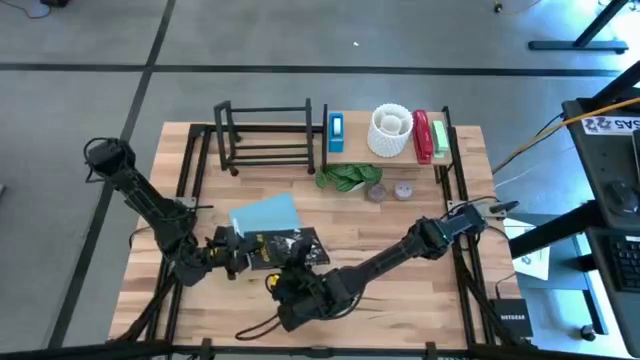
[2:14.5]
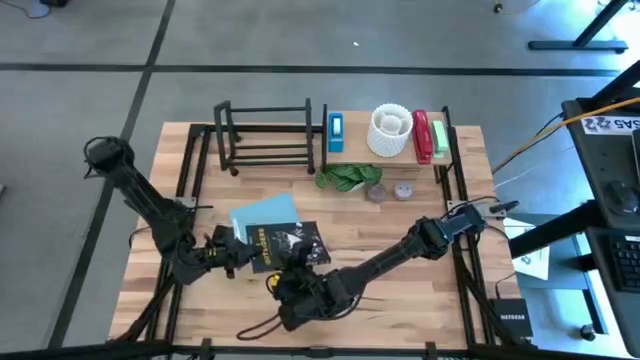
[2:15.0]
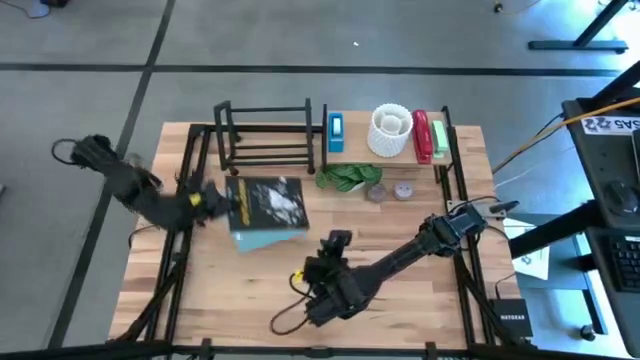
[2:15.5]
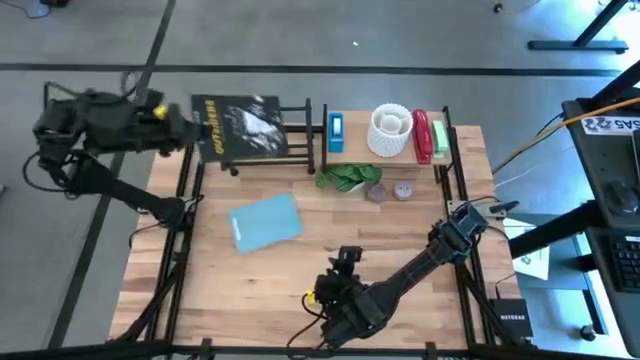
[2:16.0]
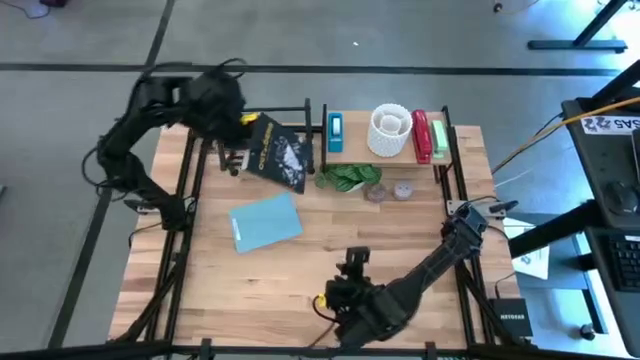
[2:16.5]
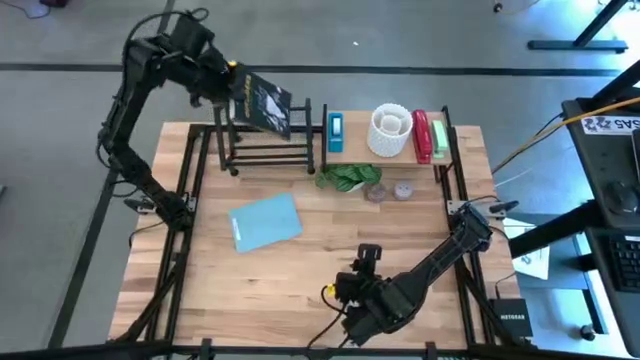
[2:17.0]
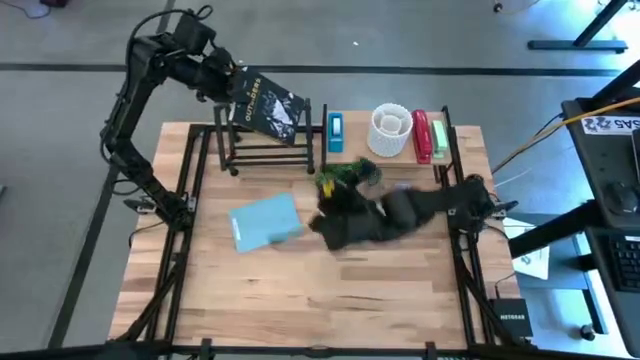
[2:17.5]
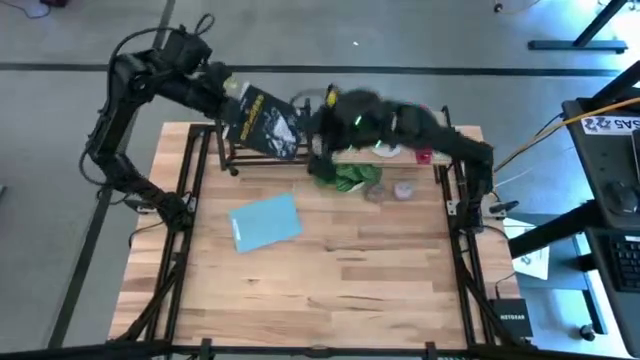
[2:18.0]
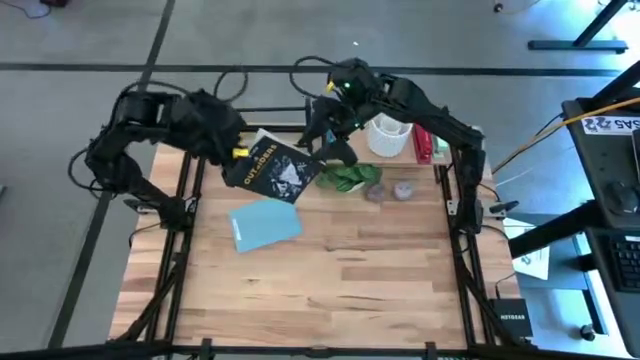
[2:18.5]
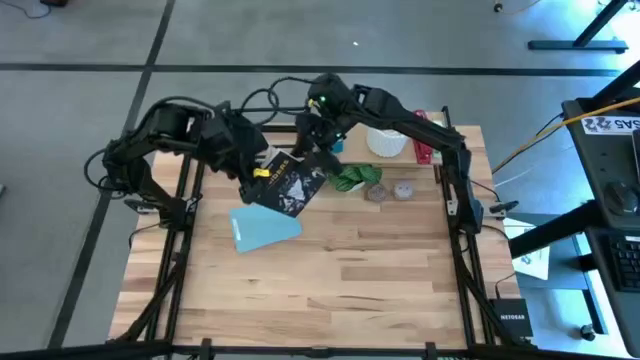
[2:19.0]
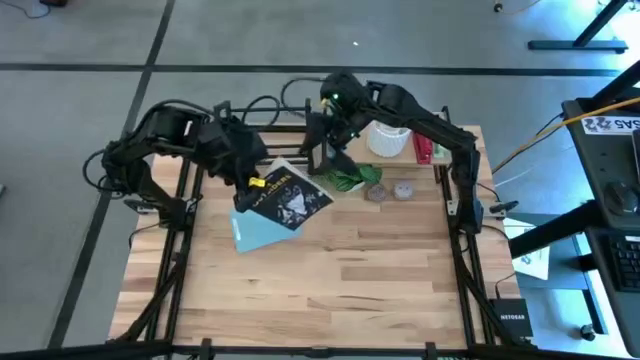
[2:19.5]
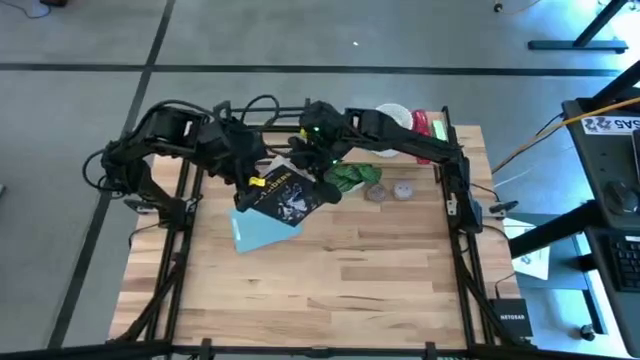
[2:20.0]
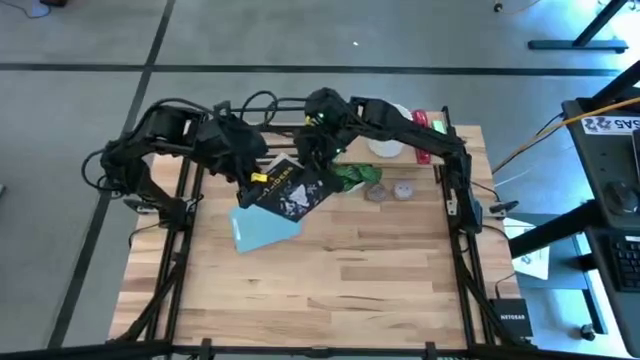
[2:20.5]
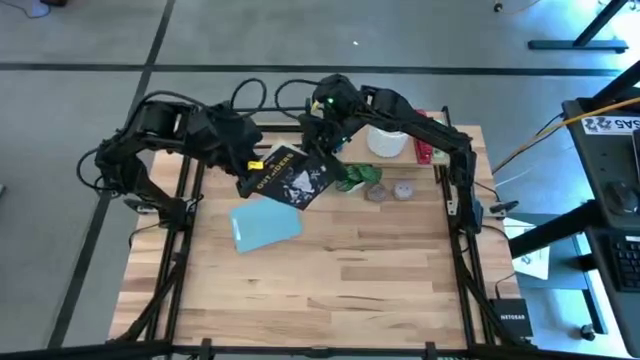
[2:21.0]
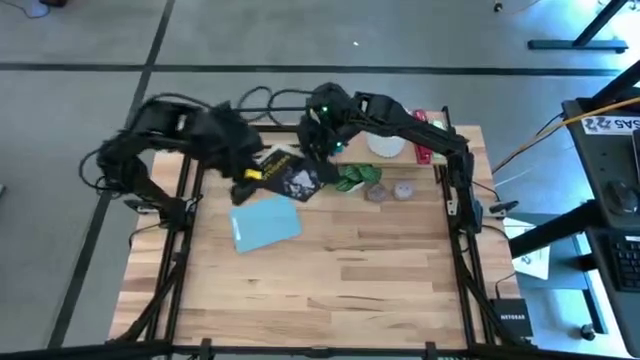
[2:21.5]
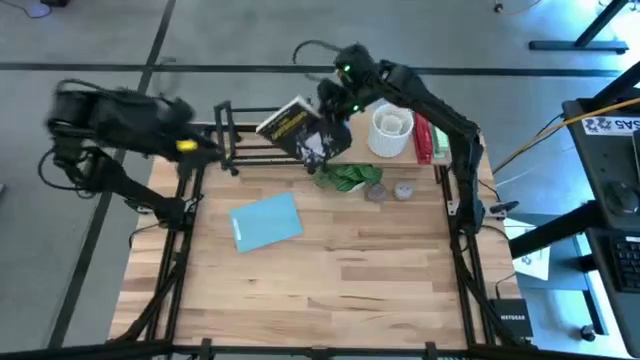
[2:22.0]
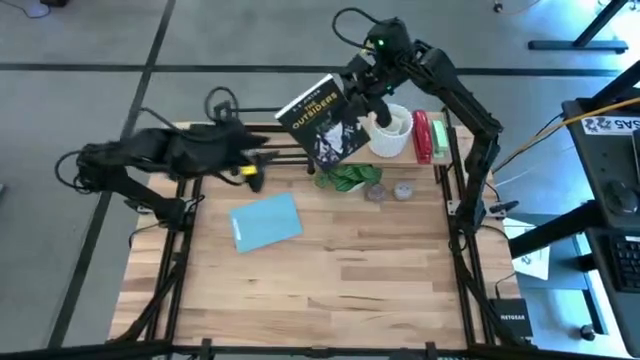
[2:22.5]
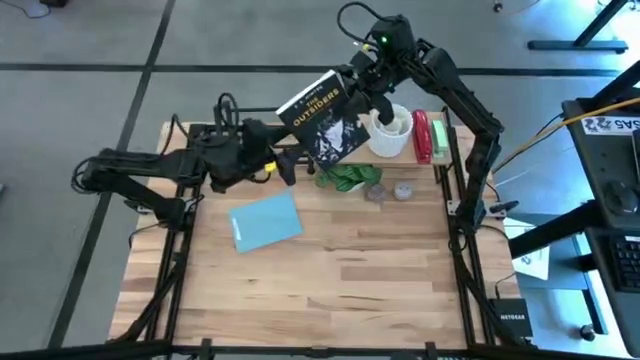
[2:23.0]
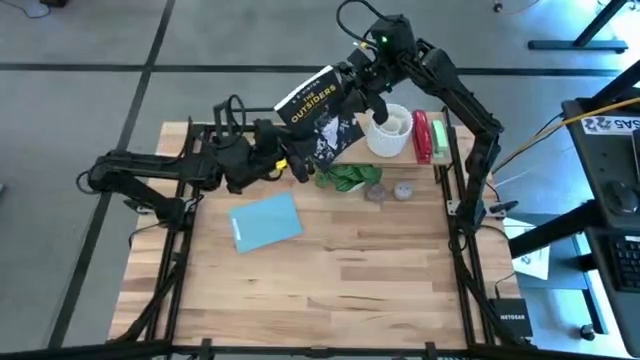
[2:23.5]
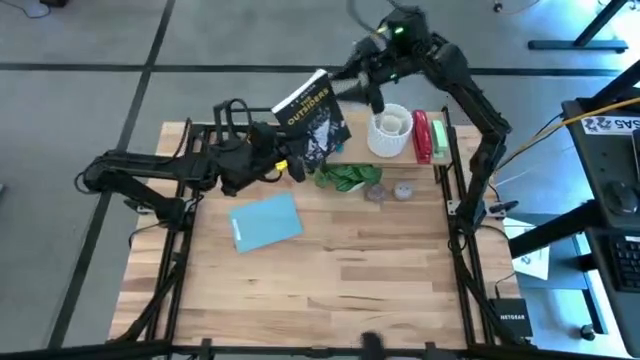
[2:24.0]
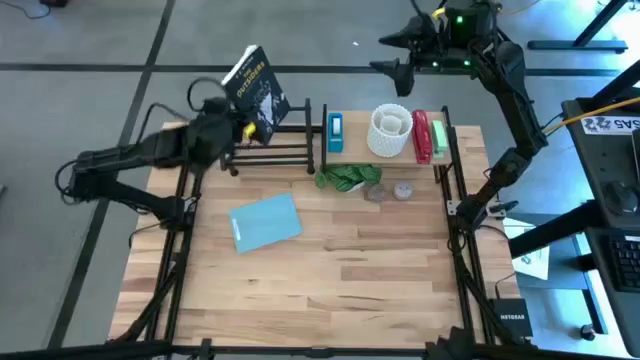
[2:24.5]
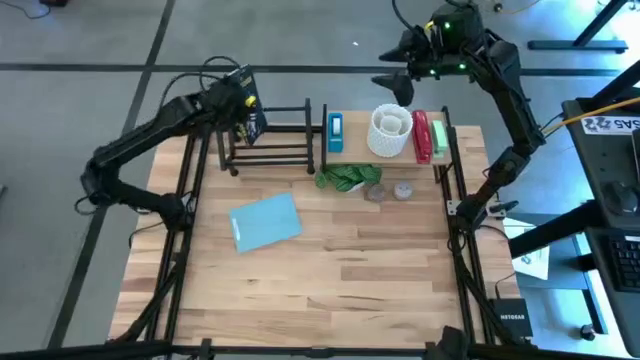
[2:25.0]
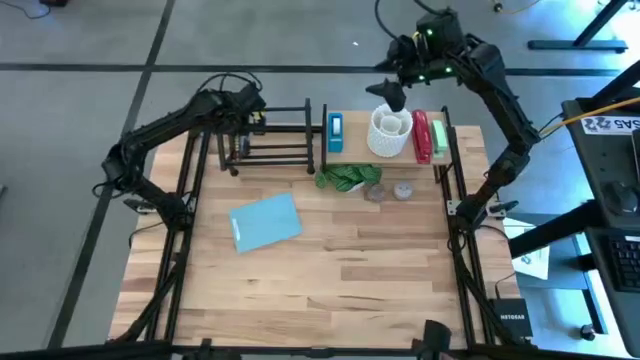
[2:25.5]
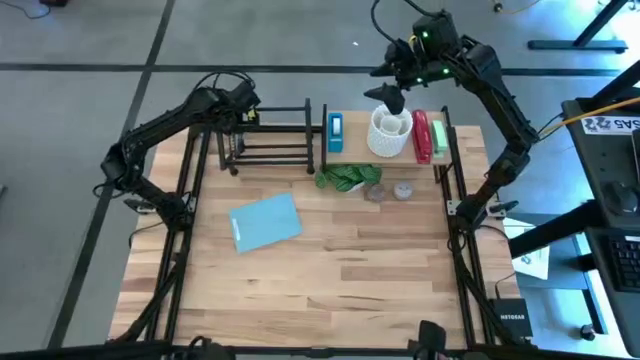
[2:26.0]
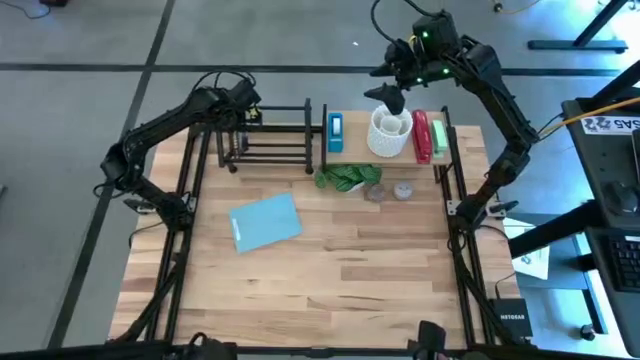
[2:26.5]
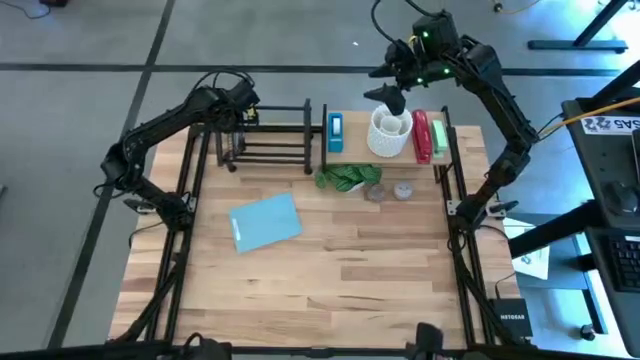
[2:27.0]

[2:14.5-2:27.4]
Task: Stock shelves
Put the black book on the bookshelf

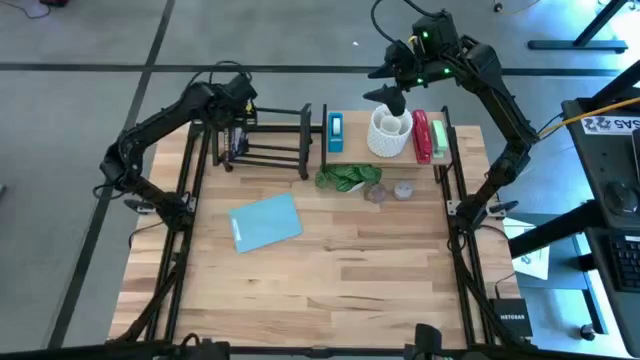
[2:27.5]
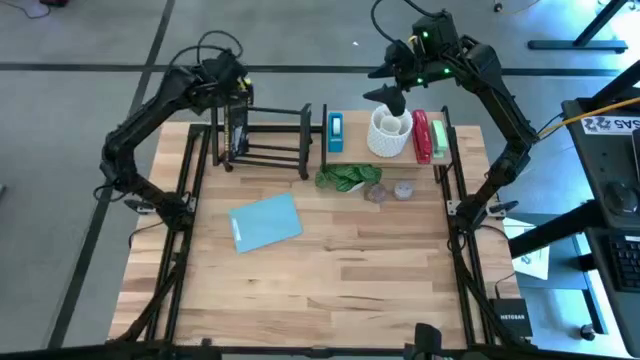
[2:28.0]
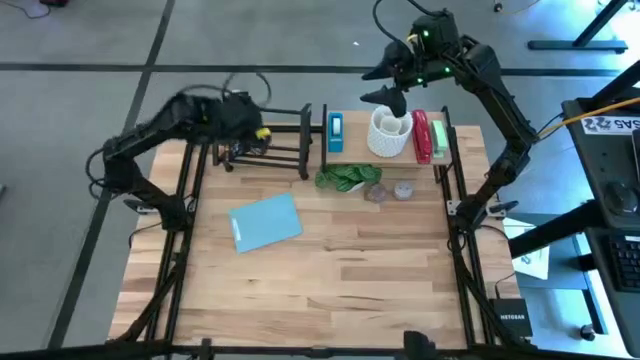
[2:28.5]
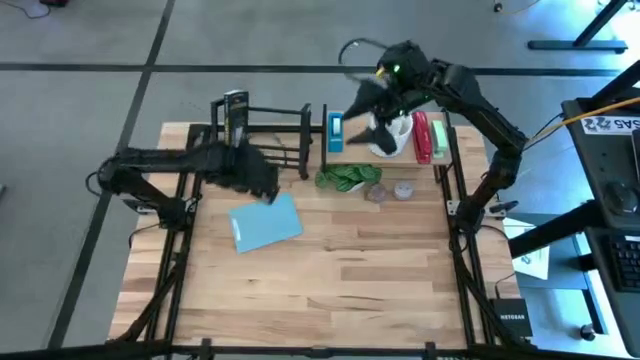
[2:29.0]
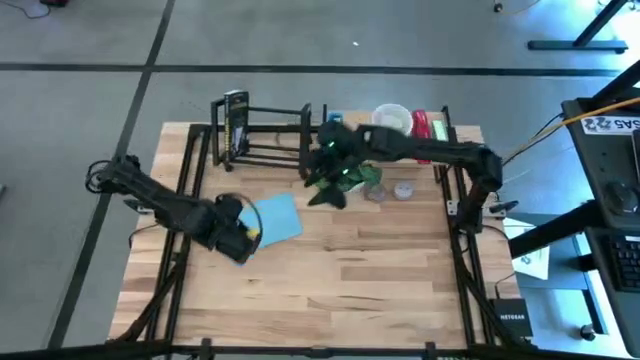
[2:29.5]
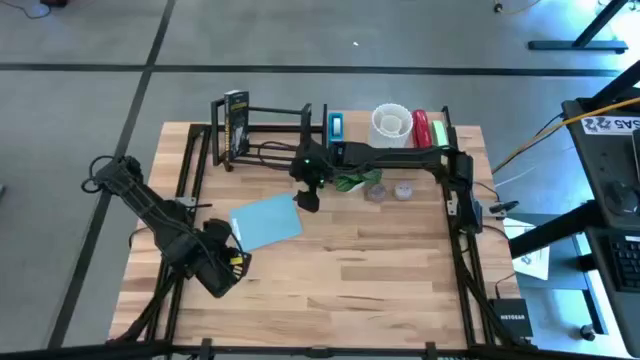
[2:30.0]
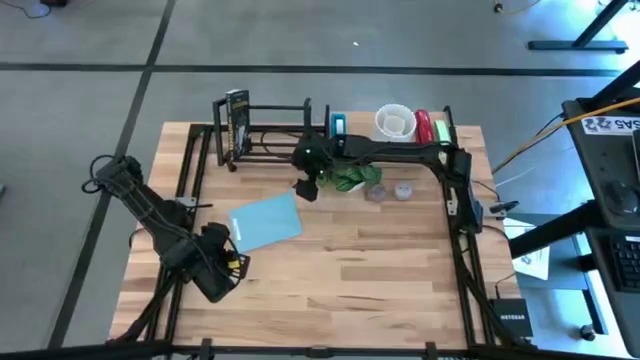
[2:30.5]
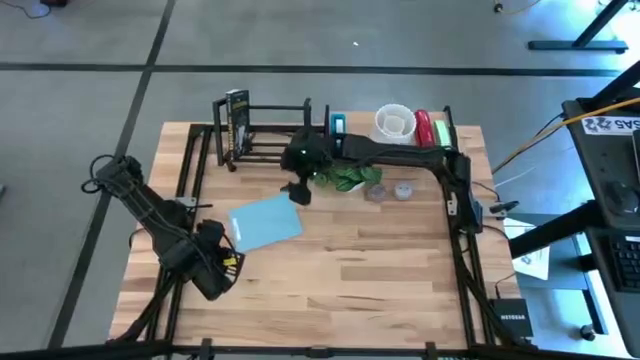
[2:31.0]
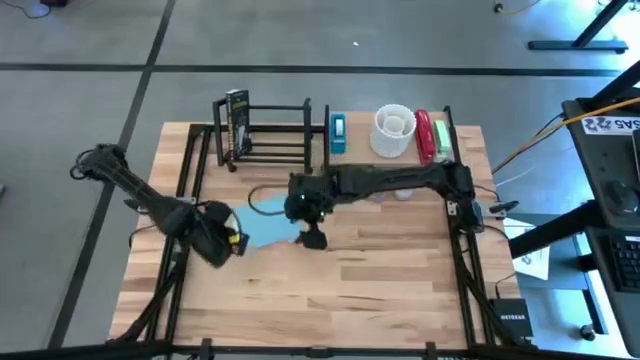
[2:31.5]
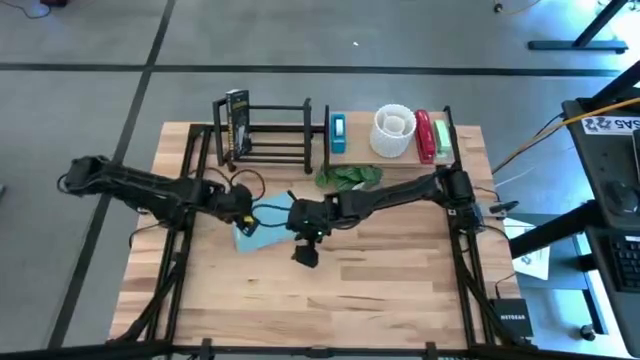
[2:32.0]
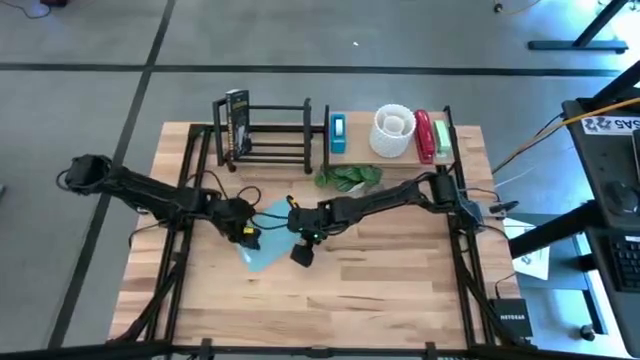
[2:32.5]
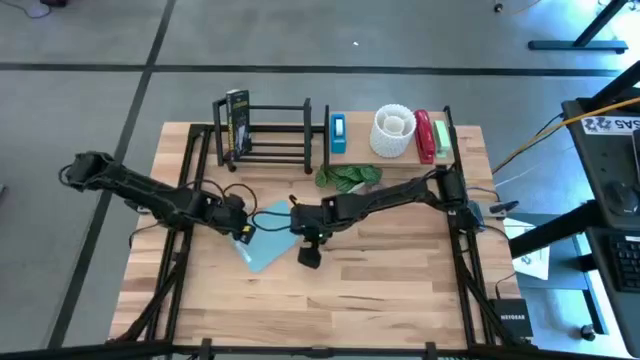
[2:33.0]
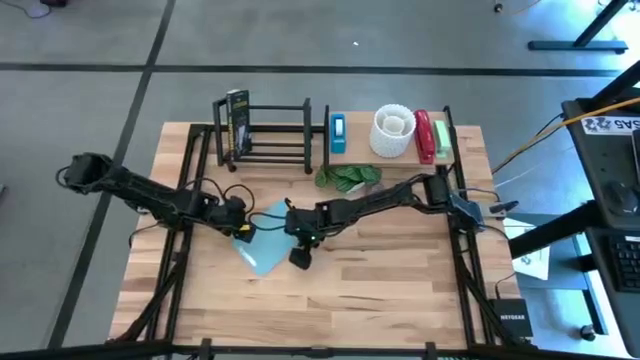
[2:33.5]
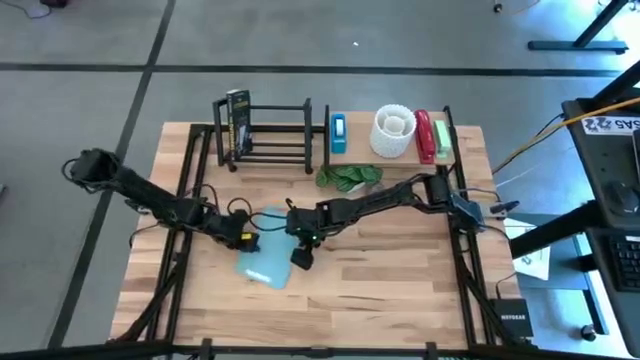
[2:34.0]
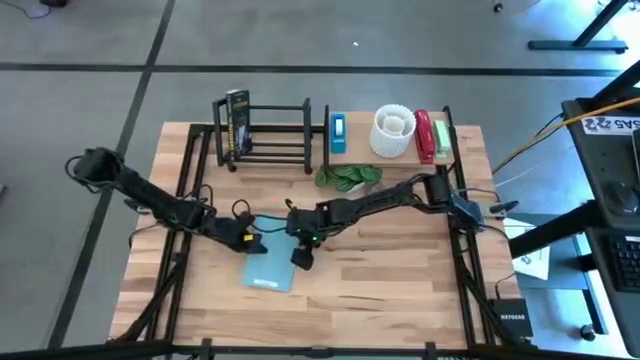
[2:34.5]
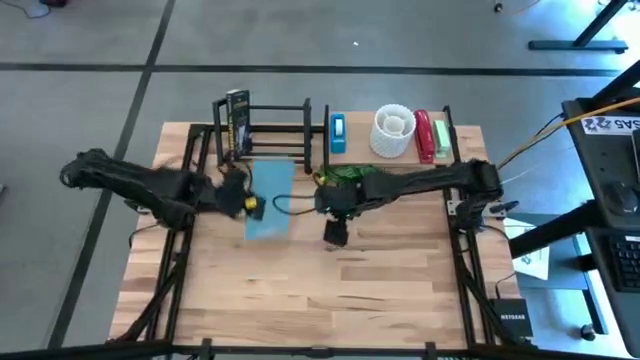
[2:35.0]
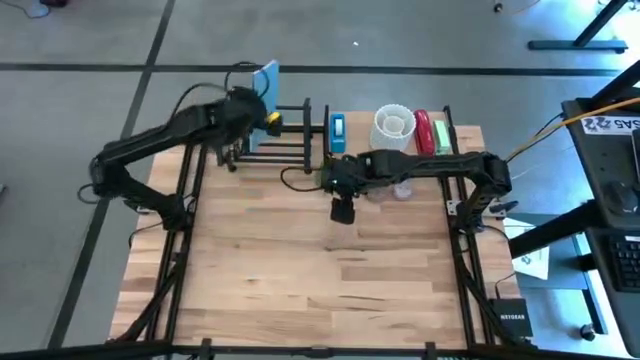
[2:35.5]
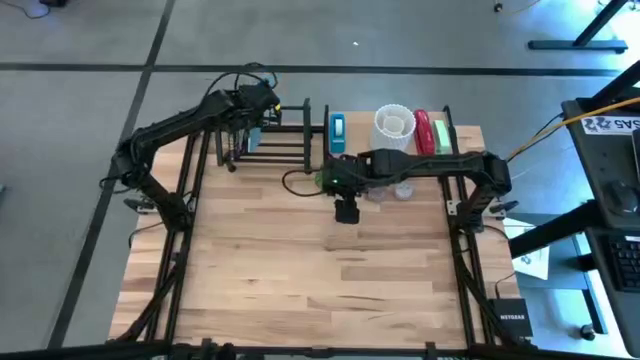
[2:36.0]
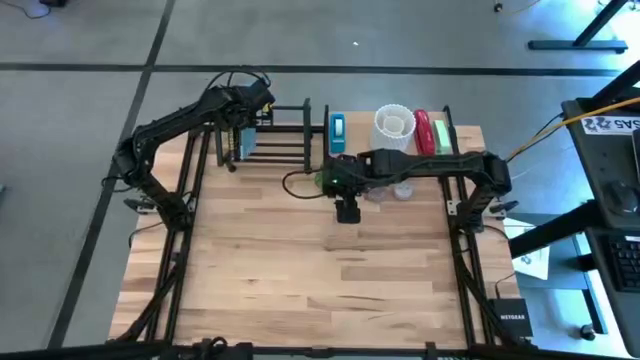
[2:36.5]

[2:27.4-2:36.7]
Put the blue book on the bookshelf
